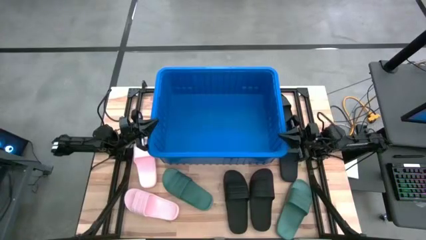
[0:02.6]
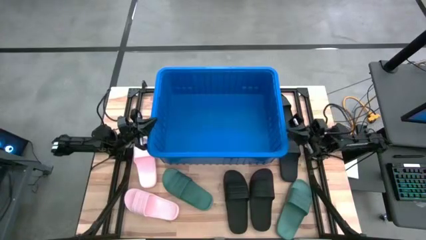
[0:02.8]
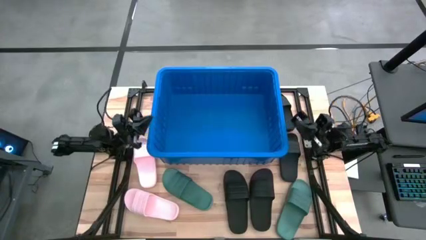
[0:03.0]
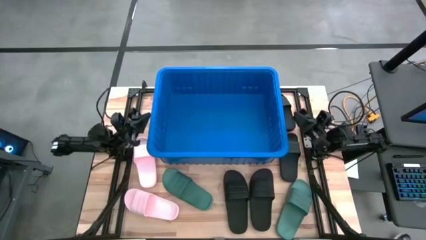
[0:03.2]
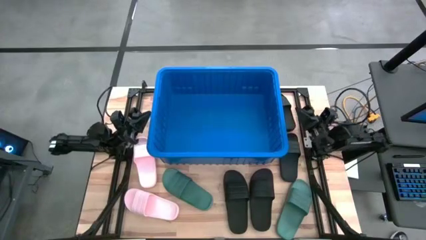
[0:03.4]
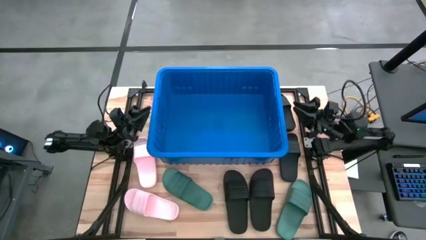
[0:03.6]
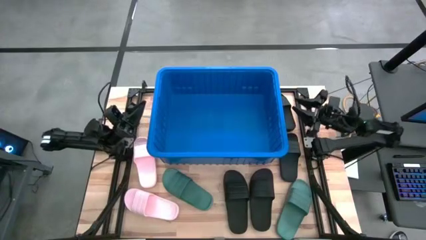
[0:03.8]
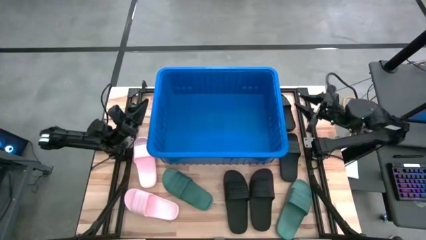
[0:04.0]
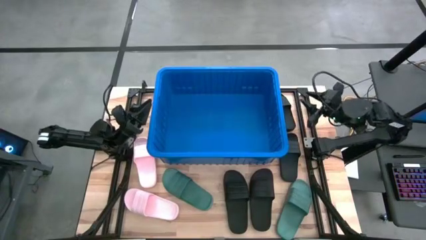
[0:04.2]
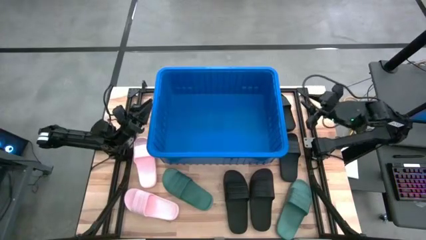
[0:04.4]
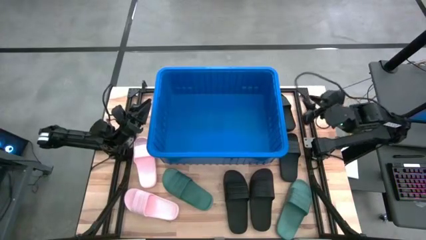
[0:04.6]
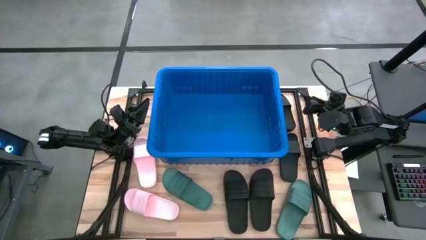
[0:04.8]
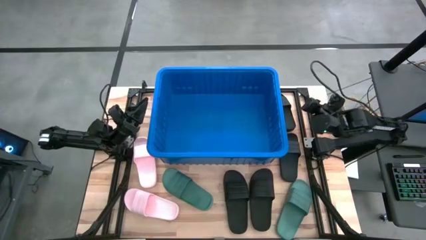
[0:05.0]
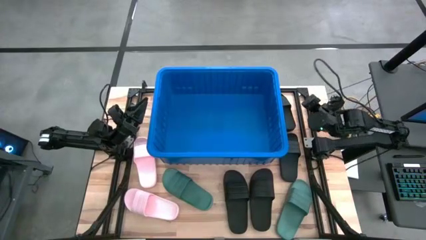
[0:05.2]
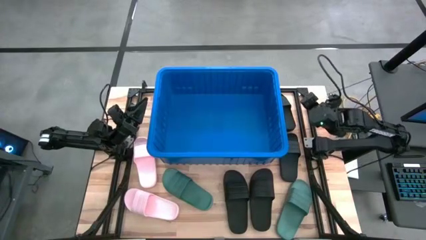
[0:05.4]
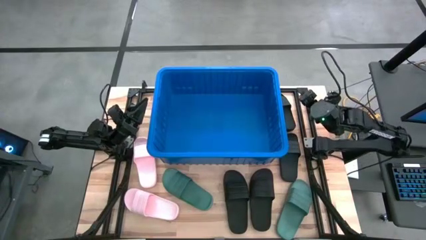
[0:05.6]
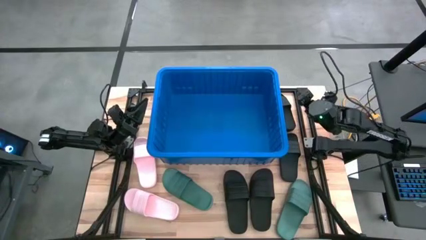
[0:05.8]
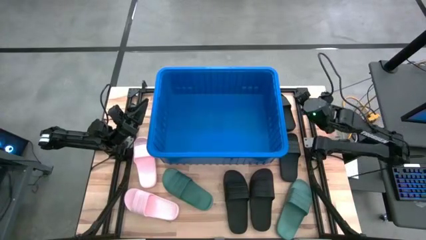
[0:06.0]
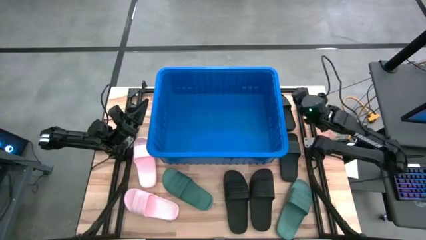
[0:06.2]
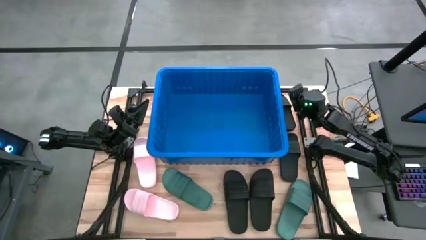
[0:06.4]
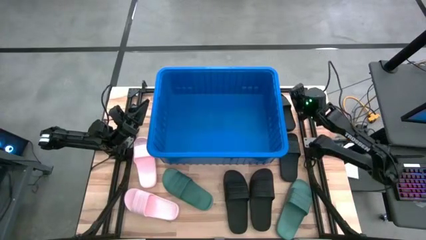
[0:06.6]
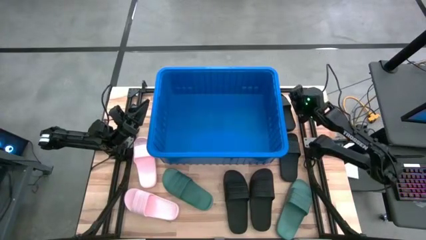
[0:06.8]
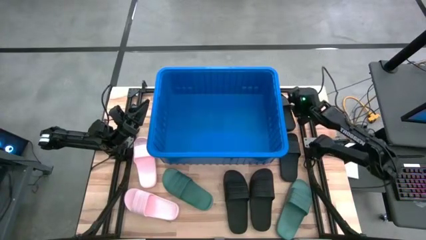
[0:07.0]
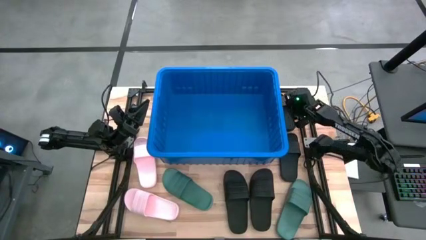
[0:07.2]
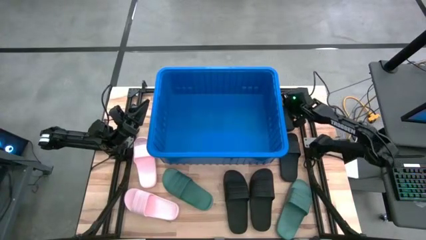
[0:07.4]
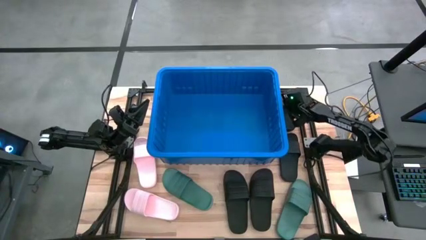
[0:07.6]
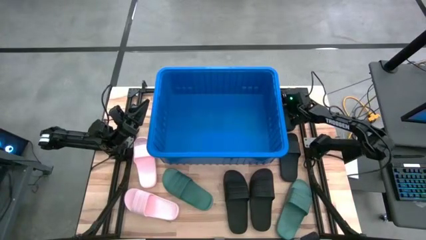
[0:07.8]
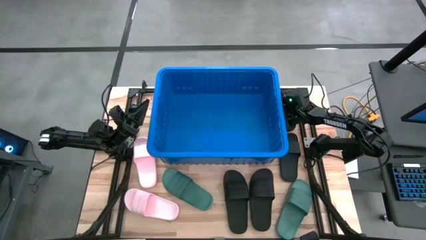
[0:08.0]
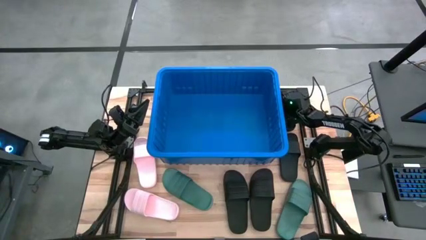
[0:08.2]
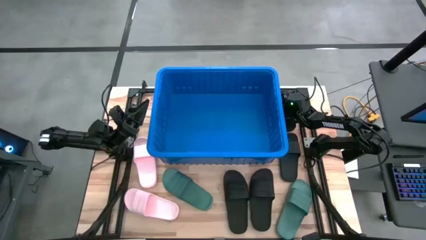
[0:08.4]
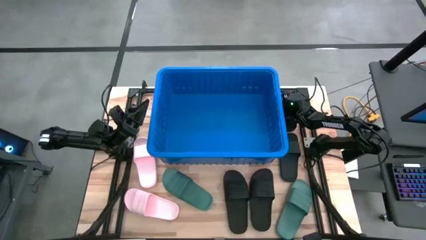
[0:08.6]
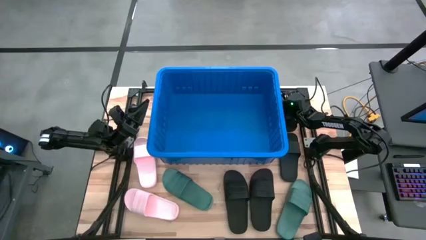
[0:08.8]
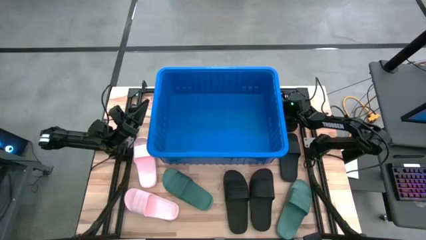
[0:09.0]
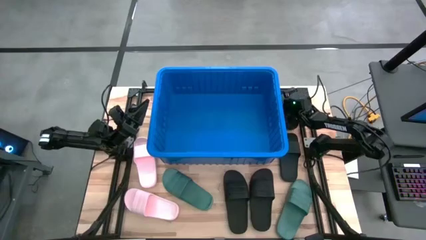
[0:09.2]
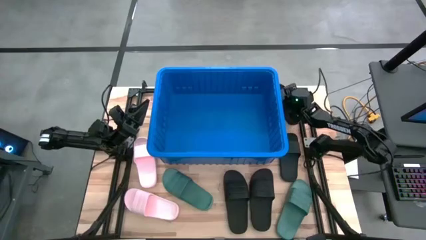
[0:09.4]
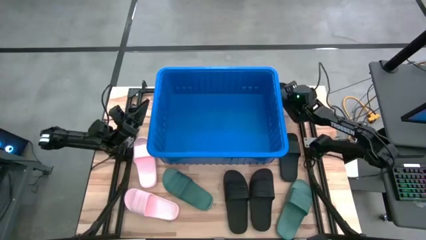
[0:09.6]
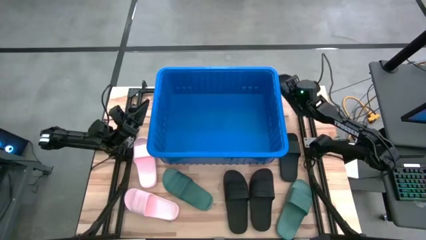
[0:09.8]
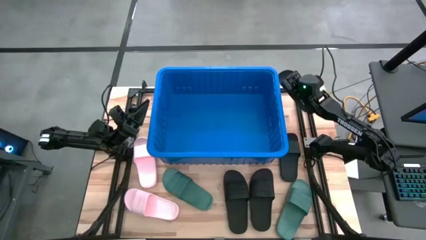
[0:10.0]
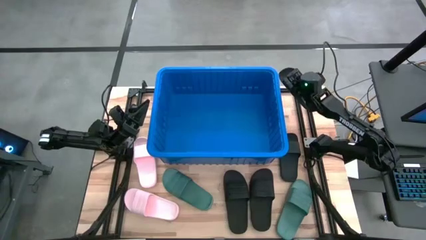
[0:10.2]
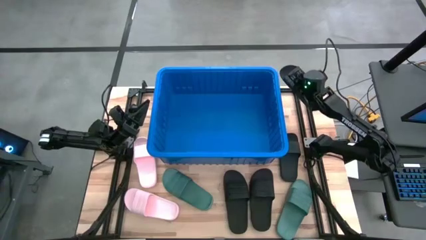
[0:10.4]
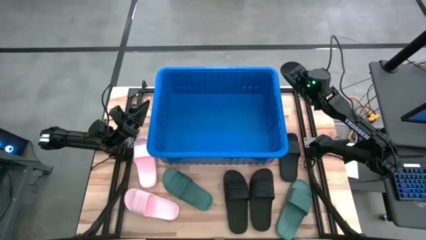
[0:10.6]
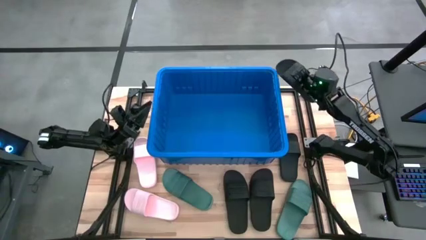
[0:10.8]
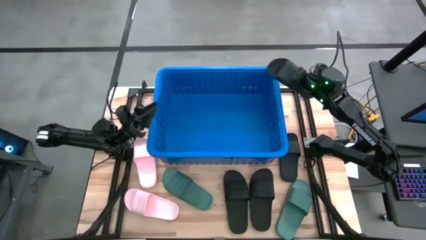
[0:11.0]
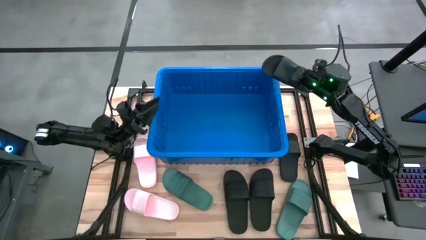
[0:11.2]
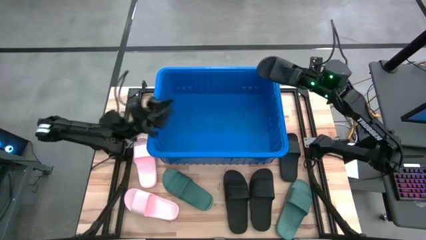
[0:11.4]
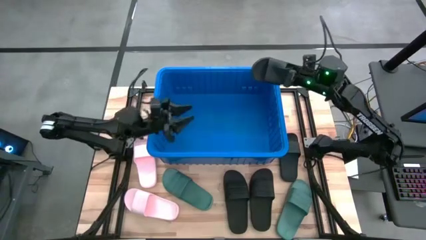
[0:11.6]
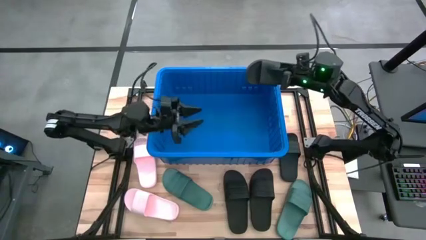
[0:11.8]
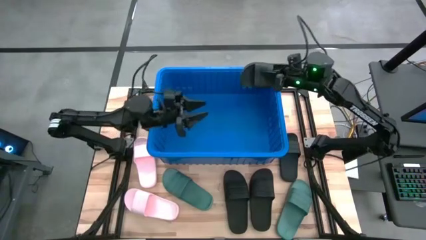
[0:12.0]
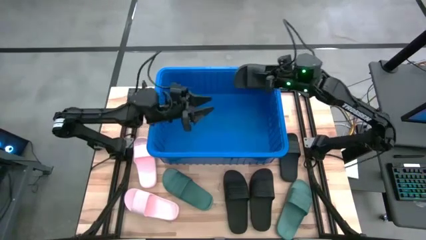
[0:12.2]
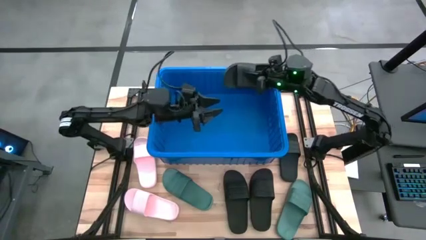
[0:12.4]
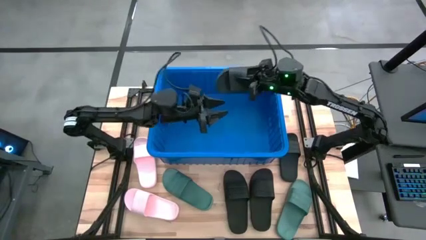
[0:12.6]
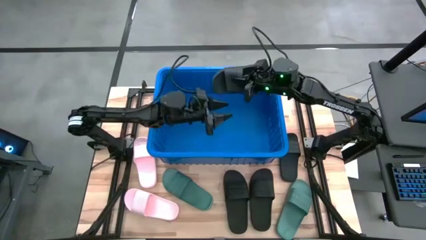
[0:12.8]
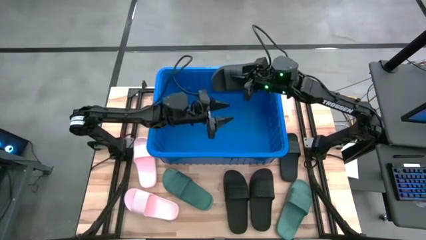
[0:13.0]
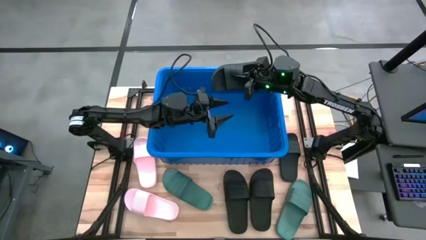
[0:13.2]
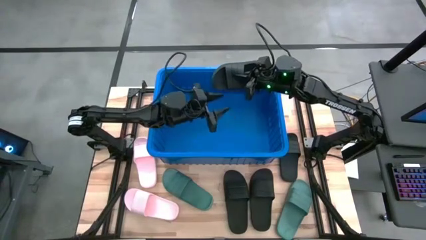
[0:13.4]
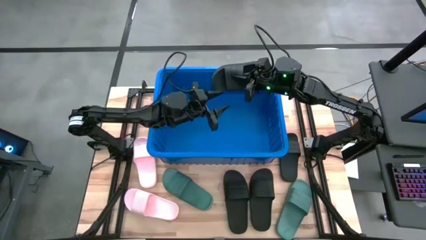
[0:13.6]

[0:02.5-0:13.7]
Task: Pick and place slides into bin
Put the black slide into the blue container
